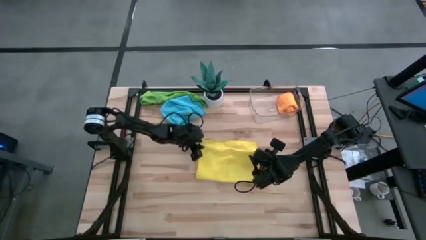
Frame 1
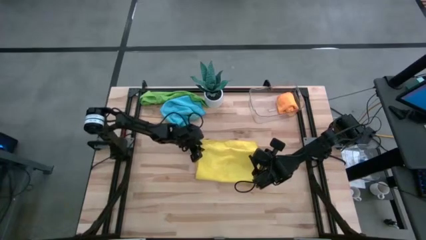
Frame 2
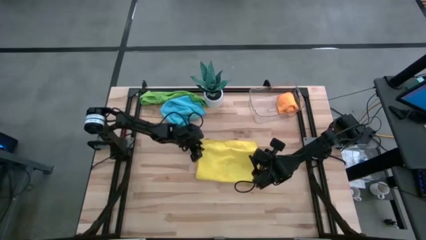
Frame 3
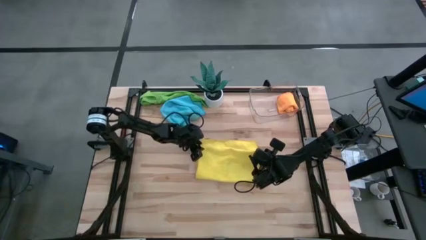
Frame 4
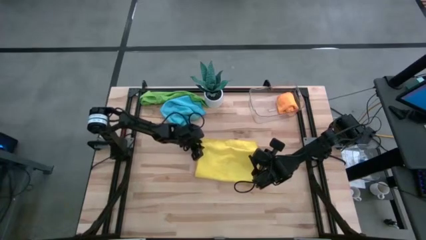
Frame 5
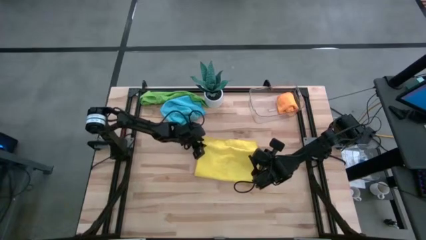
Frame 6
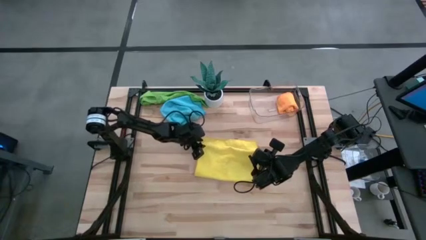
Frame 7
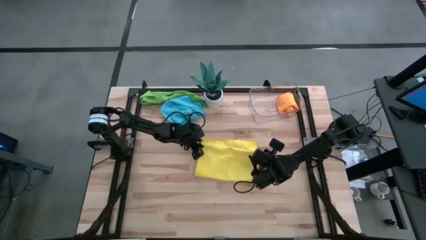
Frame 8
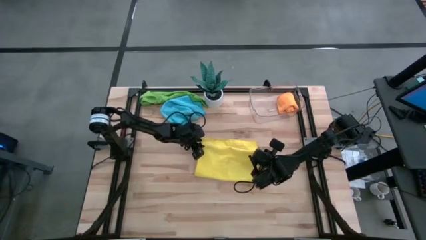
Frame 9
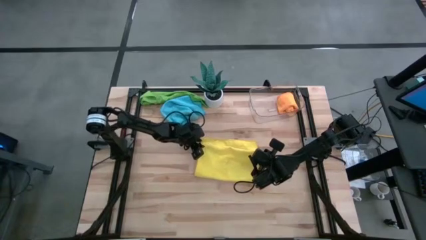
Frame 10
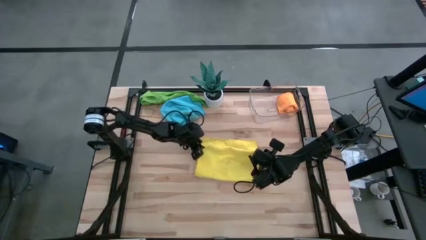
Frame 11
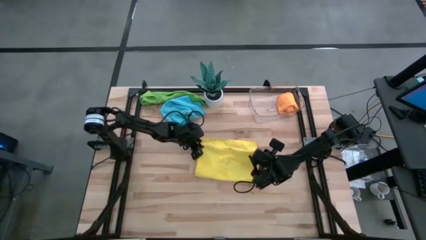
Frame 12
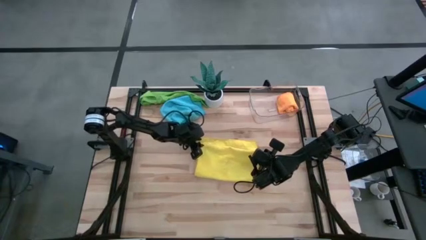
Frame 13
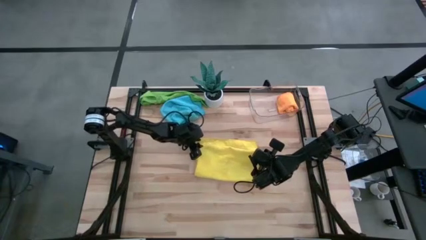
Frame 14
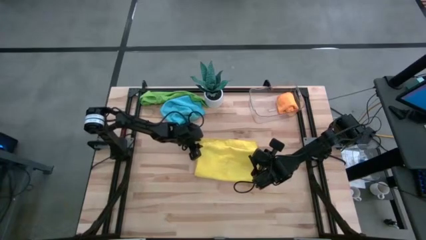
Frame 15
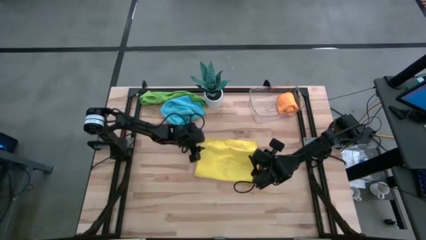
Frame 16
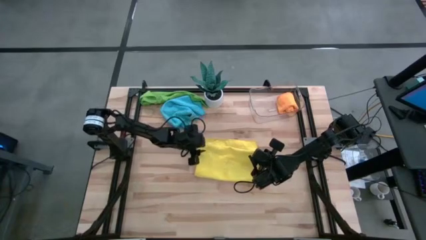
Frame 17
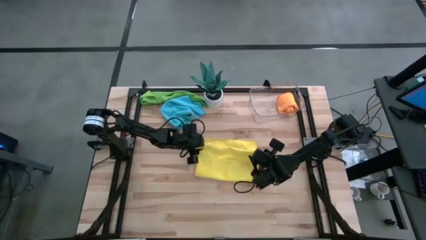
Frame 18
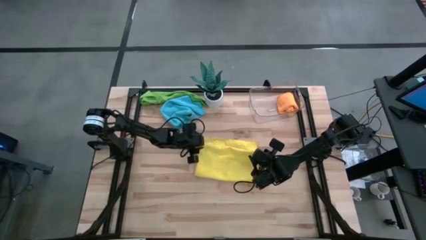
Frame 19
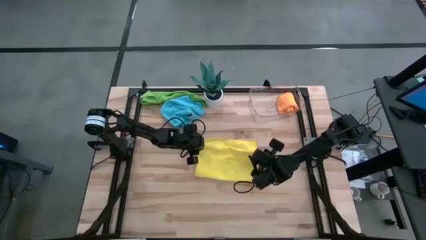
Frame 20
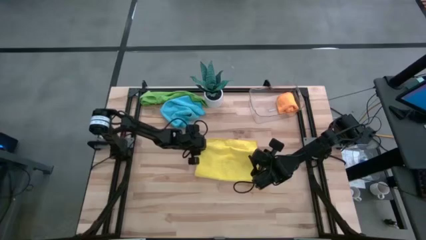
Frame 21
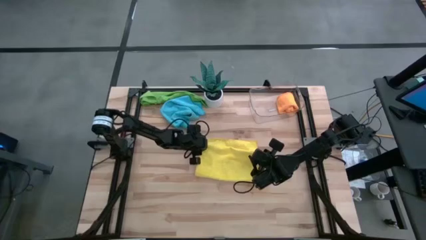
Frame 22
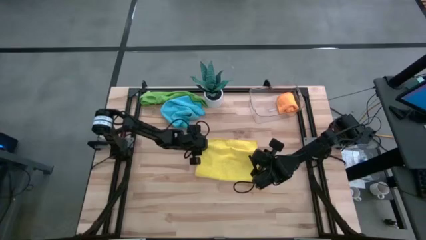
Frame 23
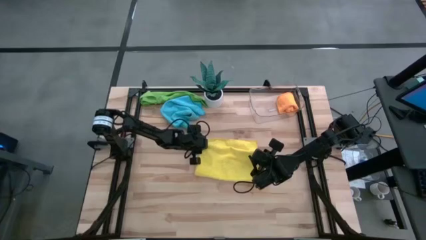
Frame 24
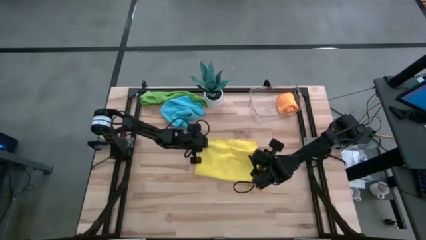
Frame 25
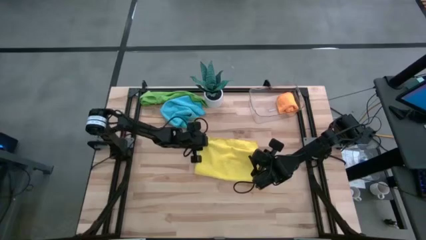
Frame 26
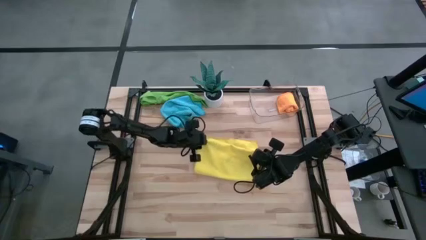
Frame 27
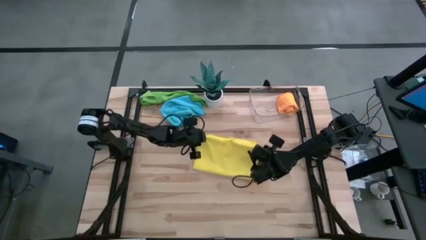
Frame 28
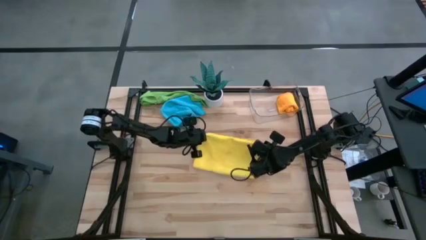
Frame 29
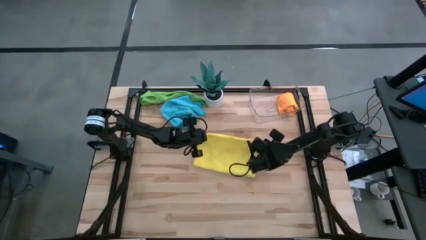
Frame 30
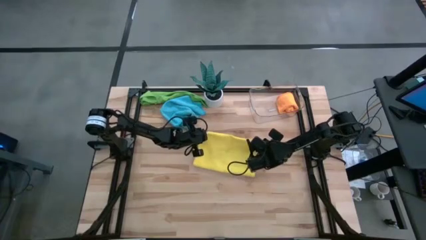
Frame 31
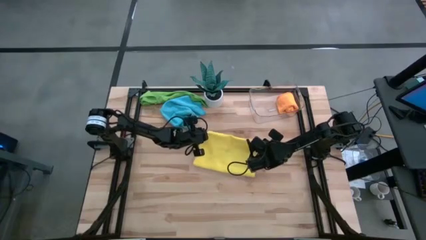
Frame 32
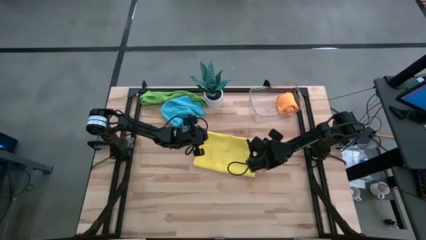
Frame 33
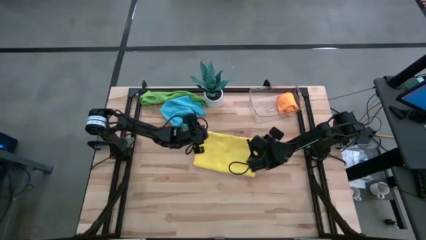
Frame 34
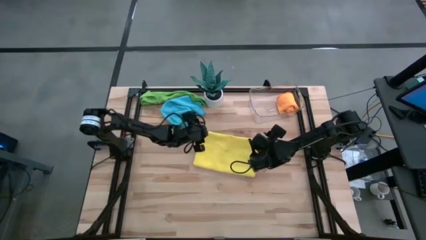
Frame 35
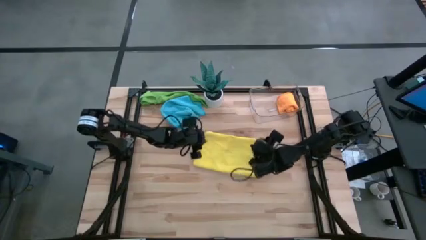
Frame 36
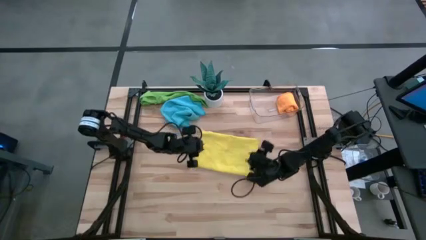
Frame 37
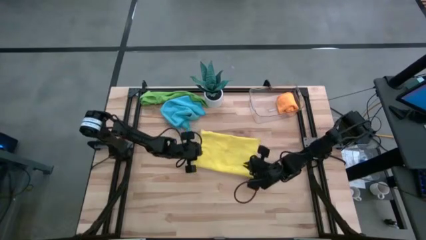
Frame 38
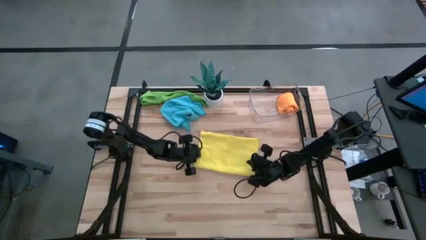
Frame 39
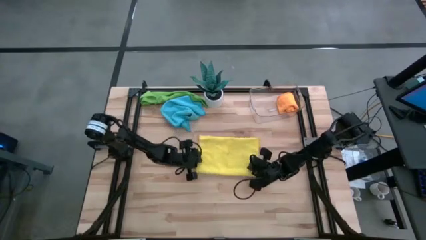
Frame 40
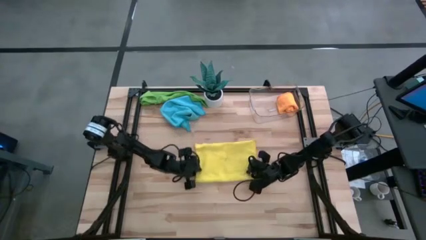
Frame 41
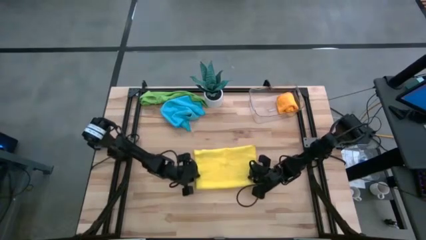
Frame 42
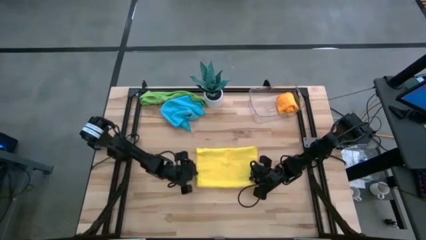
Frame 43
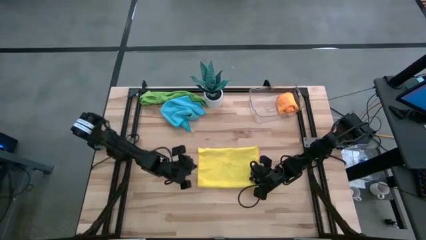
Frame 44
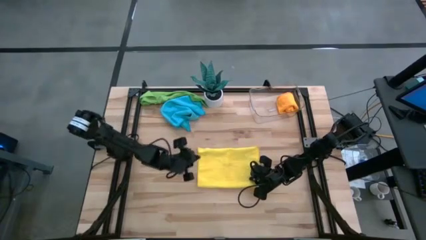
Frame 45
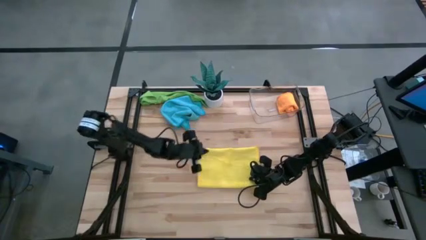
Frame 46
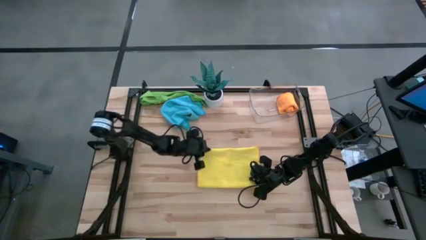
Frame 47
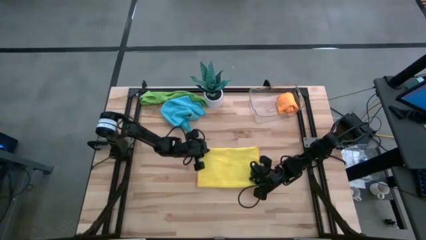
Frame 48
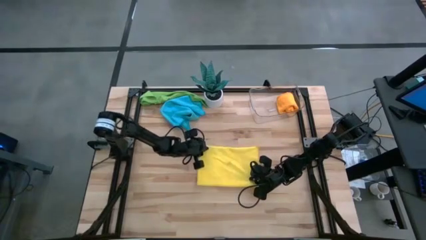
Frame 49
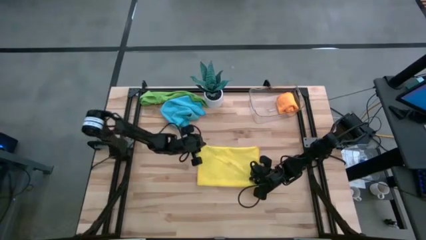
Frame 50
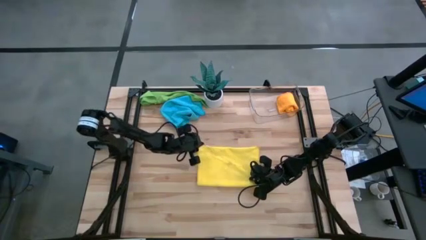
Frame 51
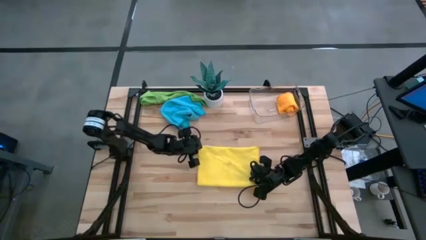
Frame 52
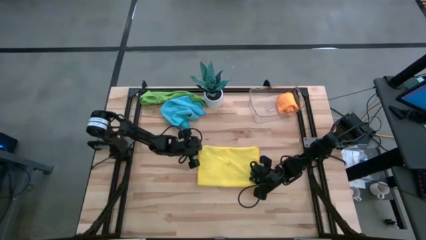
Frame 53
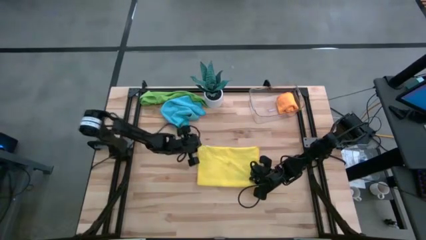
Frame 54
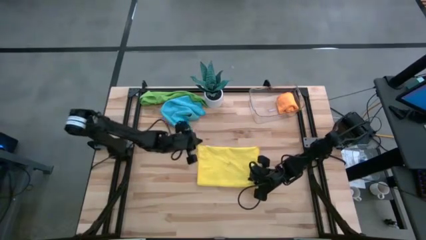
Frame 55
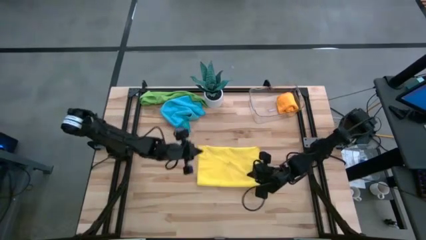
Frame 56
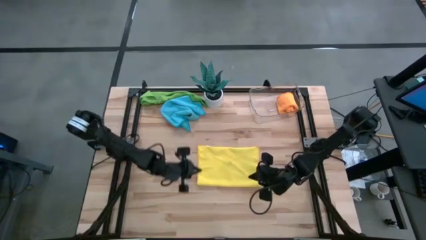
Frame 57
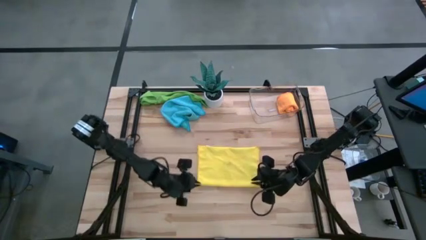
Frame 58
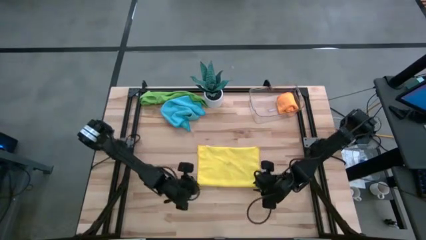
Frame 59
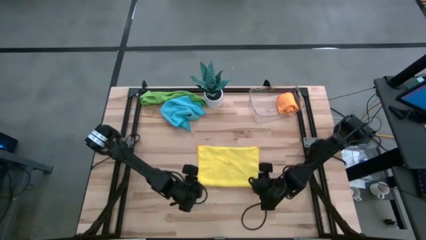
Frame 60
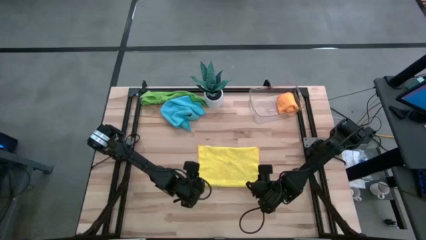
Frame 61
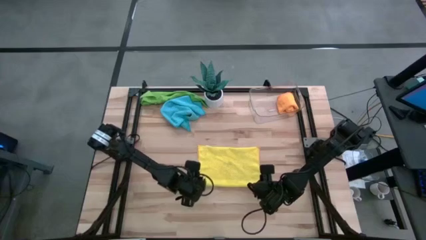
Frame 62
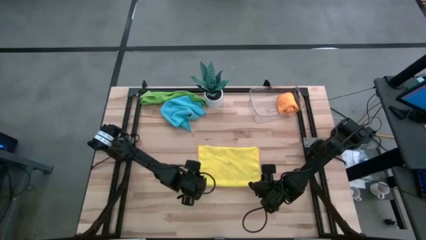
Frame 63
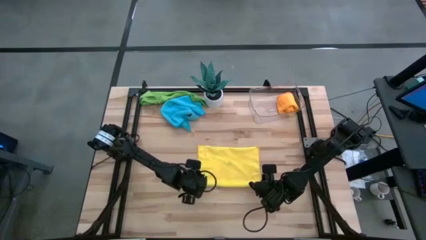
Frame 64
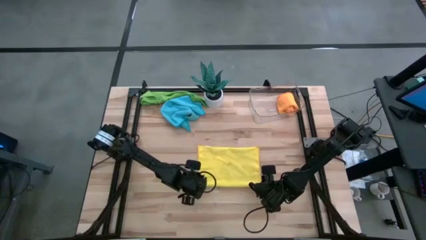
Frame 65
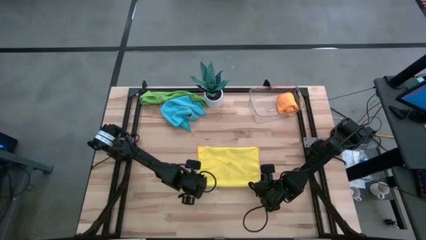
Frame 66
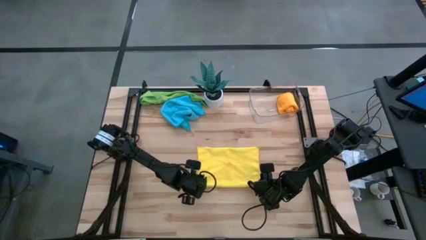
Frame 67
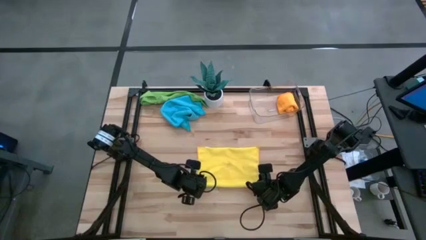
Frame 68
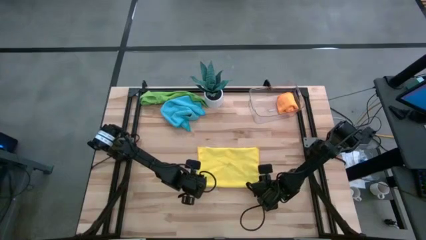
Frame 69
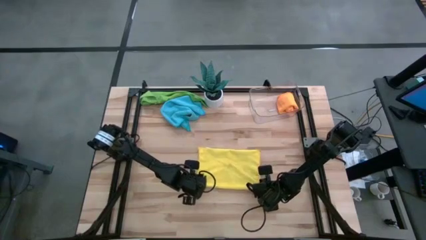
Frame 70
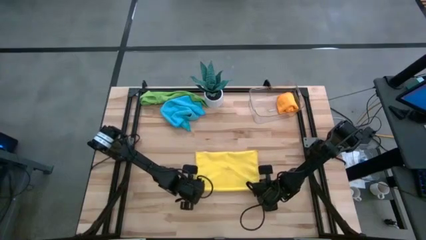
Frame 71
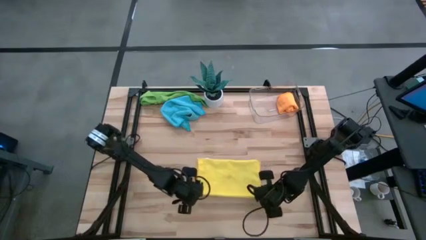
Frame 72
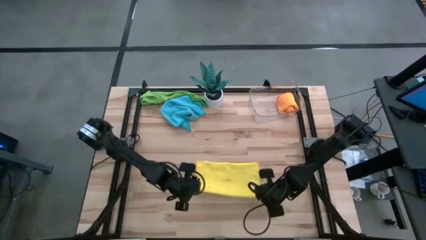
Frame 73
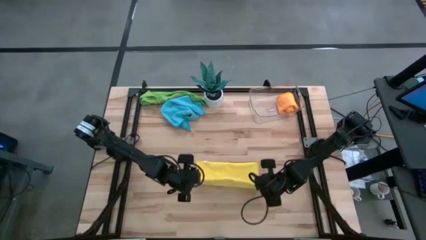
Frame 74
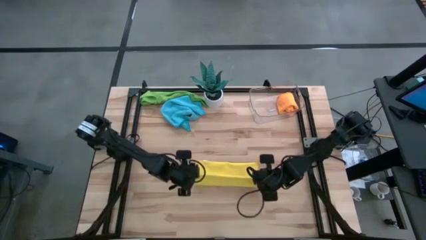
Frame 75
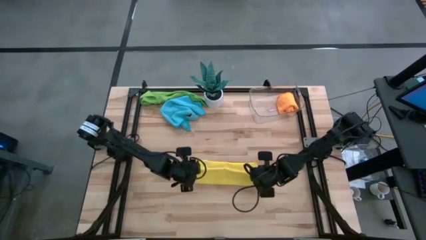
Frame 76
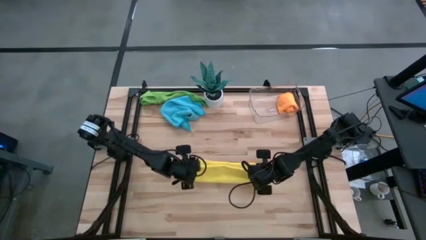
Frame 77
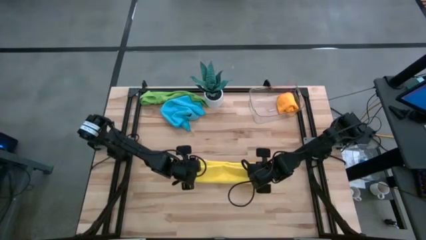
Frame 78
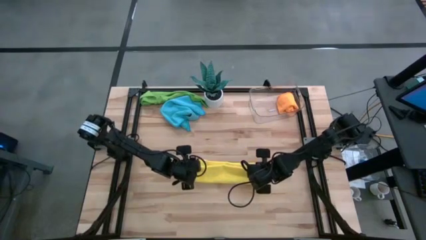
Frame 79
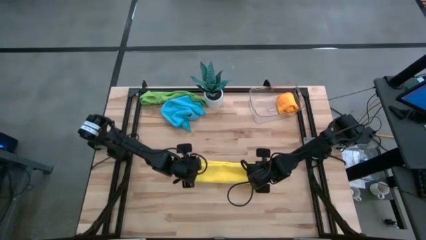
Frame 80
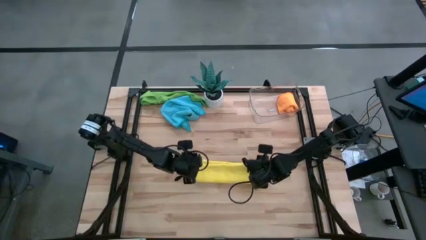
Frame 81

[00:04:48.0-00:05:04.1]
Task: Roll microfiber towels into tight, uniform cylinder then place into a basket
Fold the yellow microfiber cloth

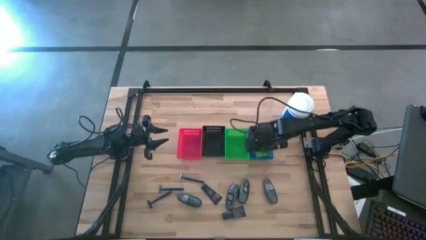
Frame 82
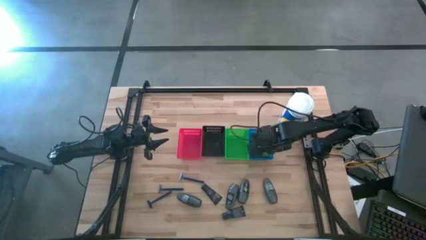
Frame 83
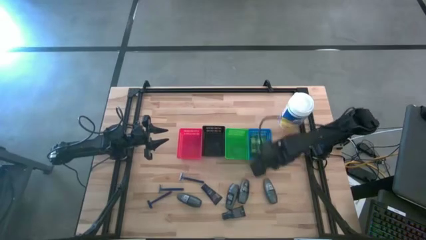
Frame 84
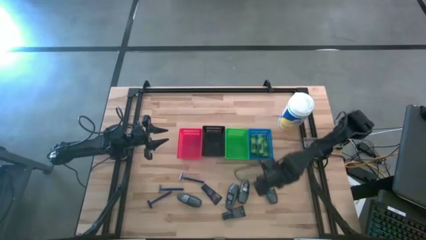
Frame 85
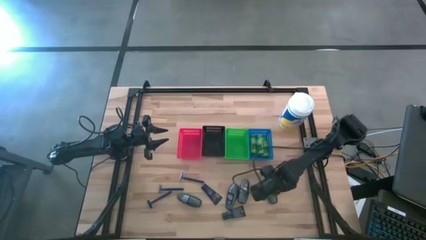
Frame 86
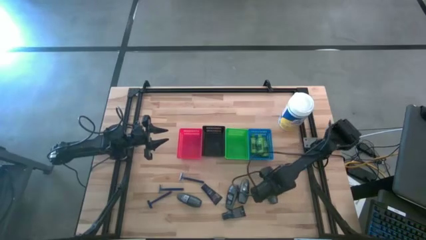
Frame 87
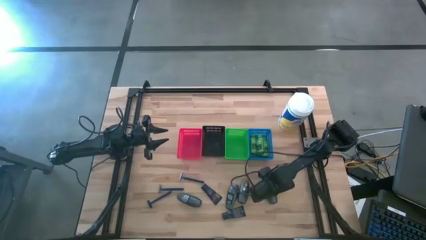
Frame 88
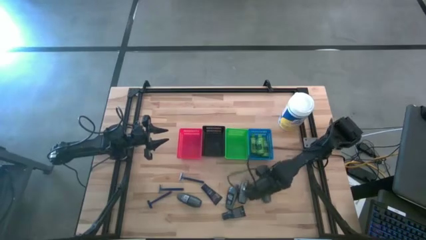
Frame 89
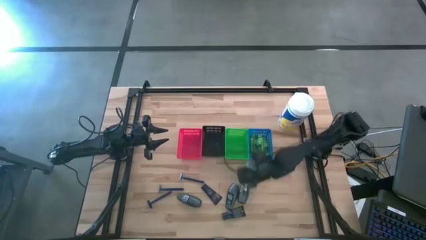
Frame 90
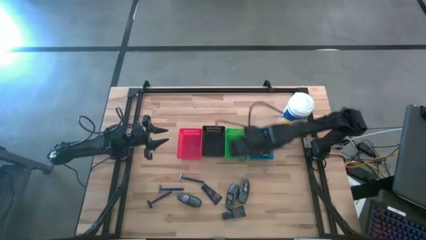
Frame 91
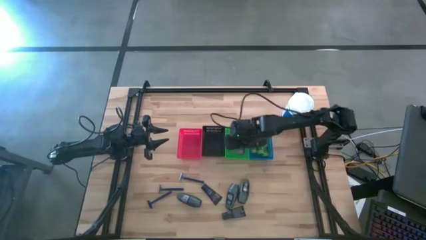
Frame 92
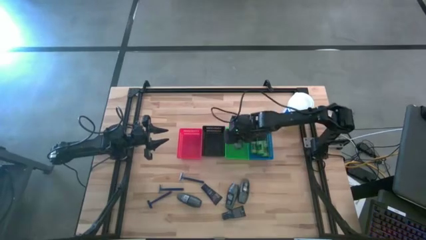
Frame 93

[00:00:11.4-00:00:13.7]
Task: Pick & Place Travel size toiletries
Put the black deodorant into the green bin
